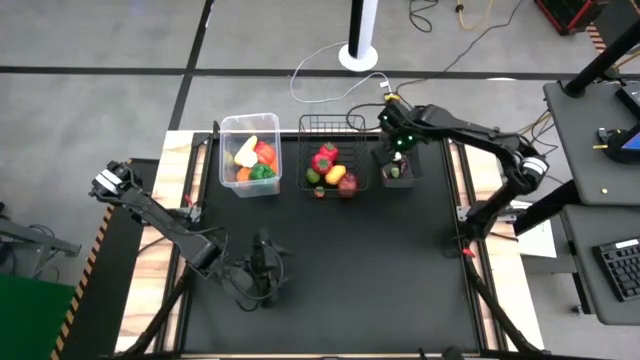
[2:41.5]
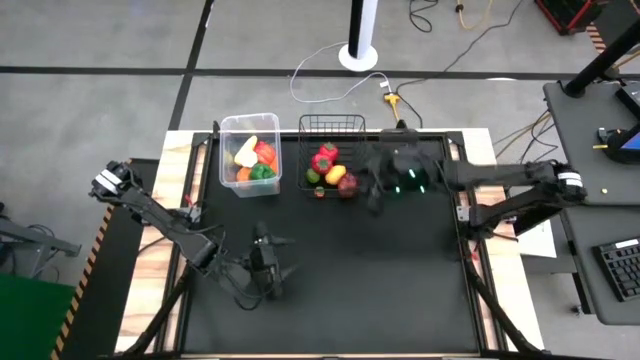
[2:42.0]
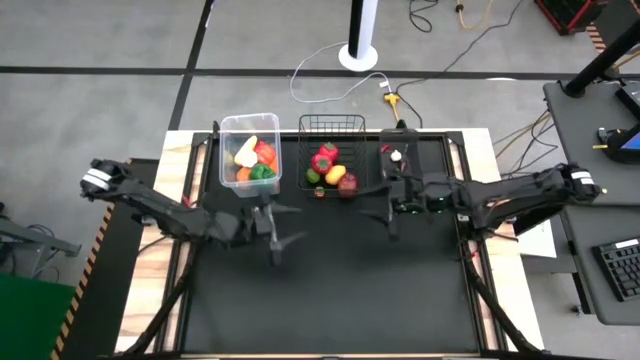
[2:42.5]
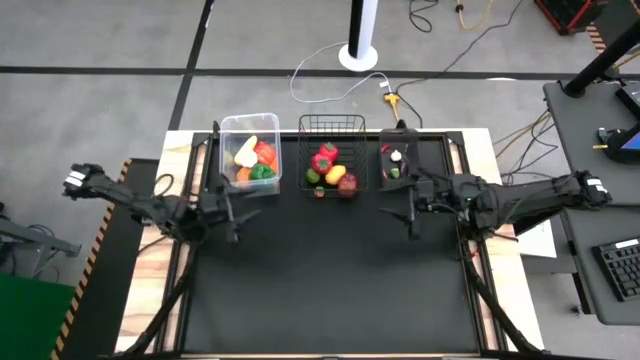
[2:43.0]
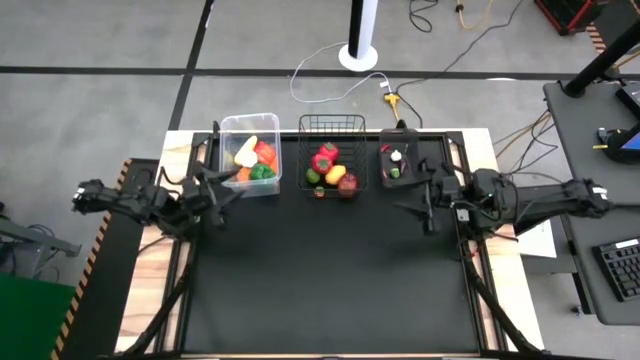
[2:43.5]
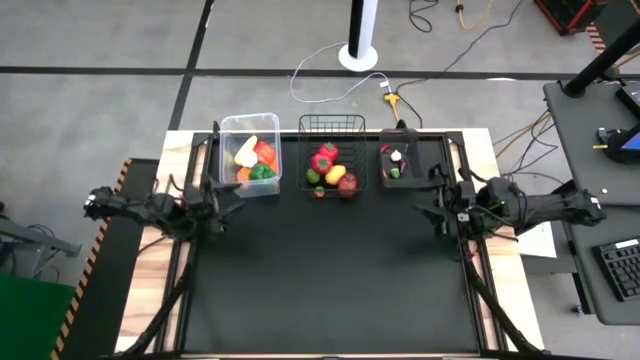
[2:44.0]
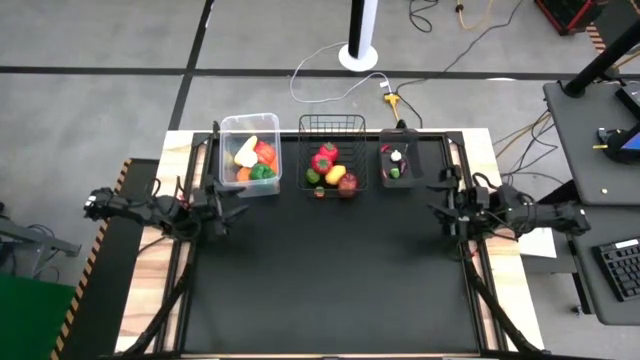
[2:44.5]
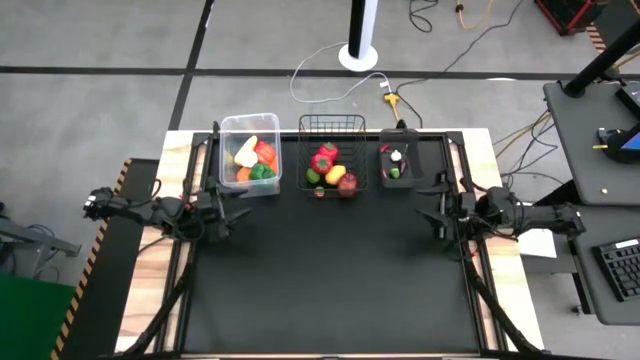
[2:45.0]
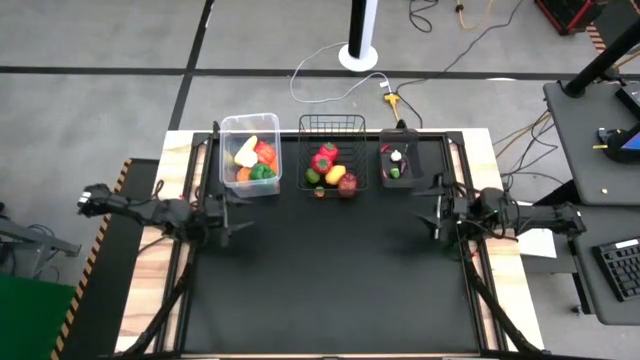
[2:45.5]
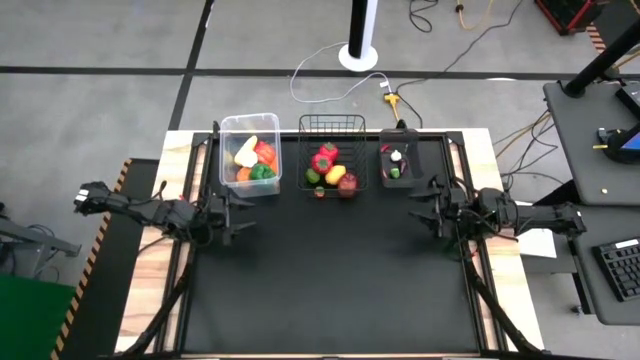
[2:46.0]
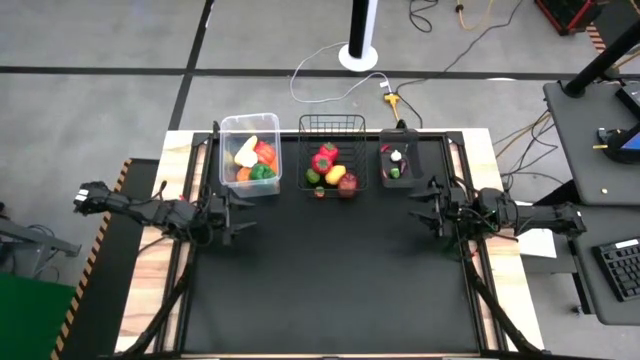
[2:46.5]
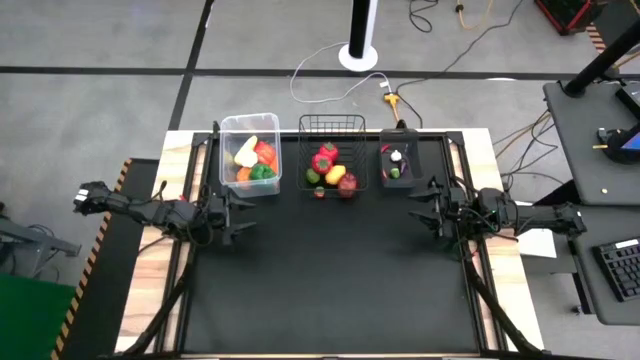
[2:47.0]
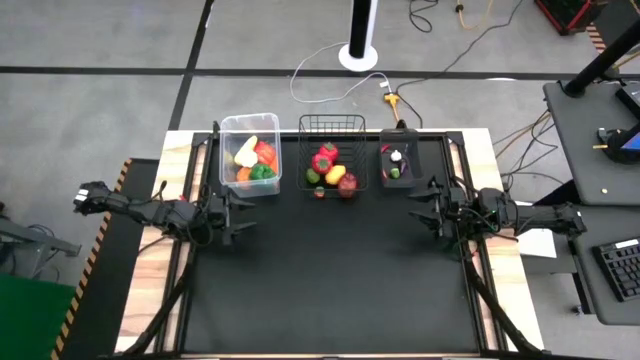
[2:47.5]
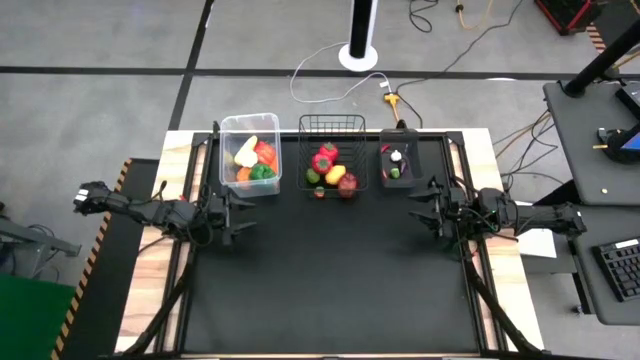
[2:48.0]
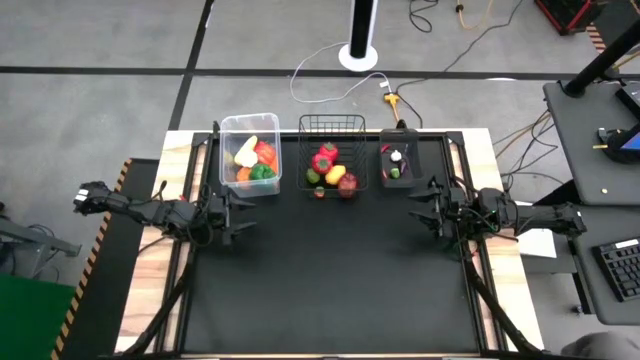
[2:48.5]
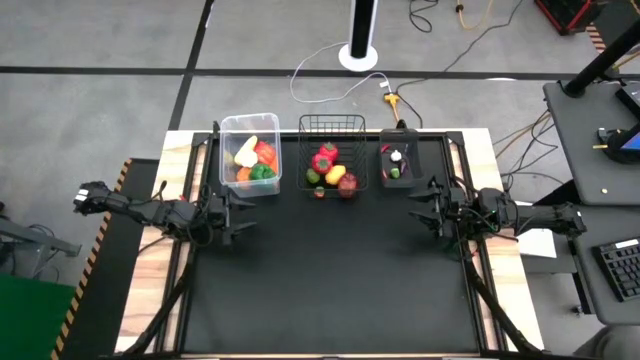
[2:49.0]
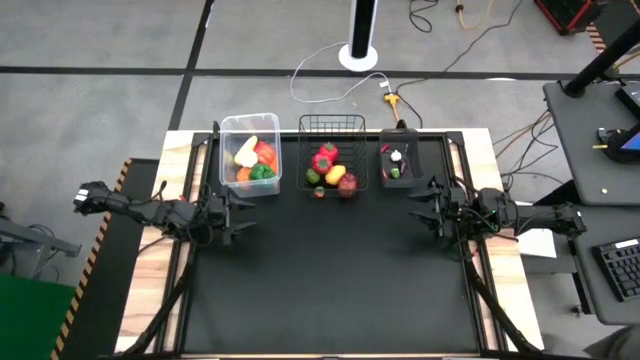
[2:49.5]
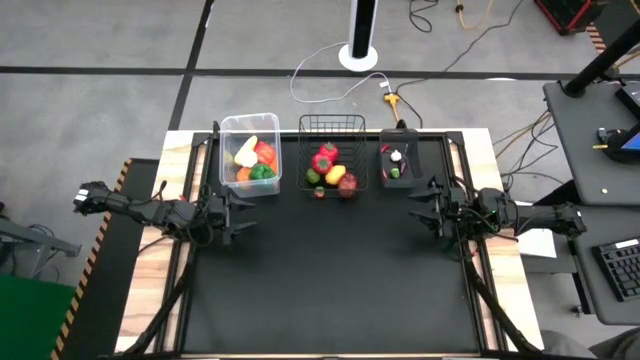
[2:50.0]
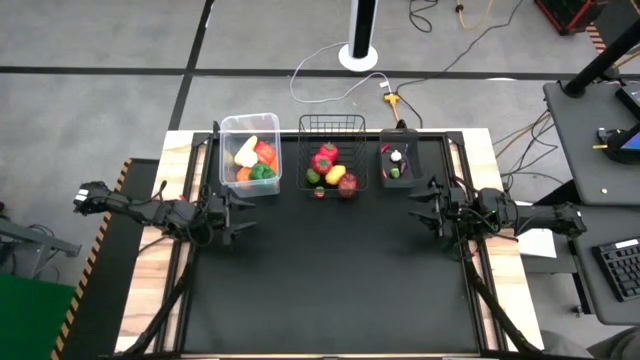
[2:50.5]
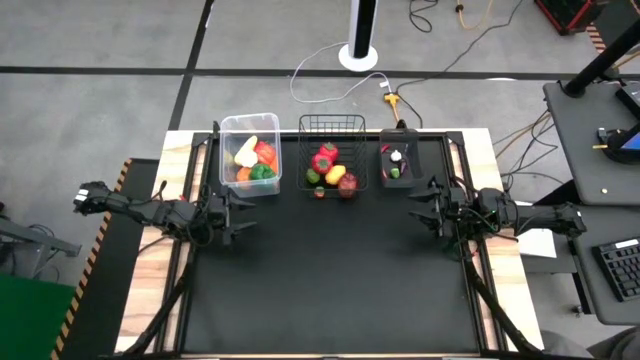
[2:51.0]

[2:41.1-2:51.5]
Task: Sort produce into baskets
Return to Home Position

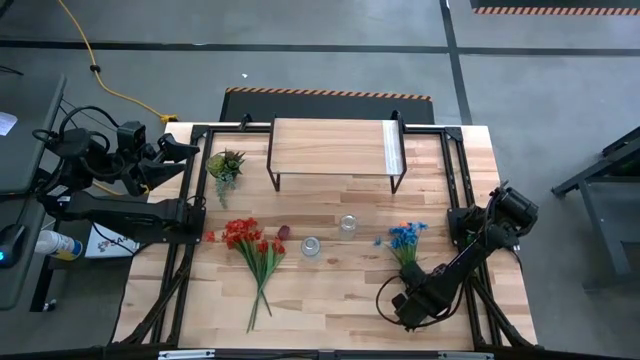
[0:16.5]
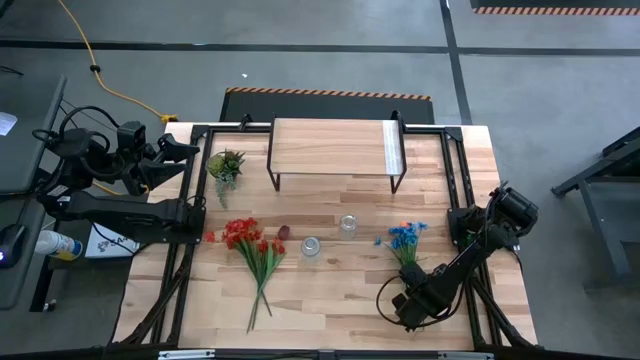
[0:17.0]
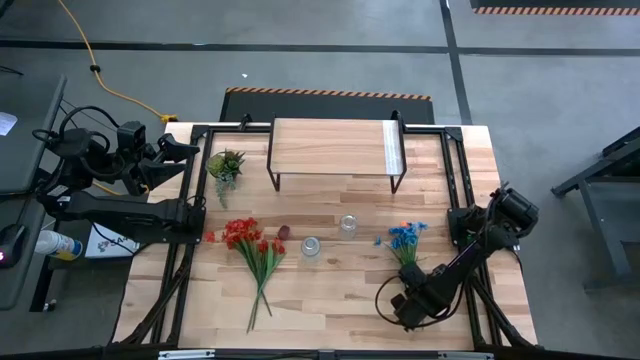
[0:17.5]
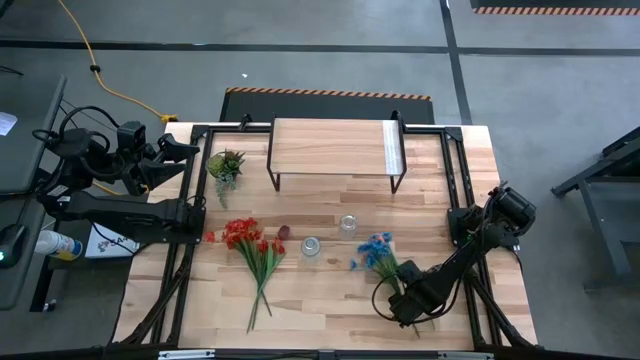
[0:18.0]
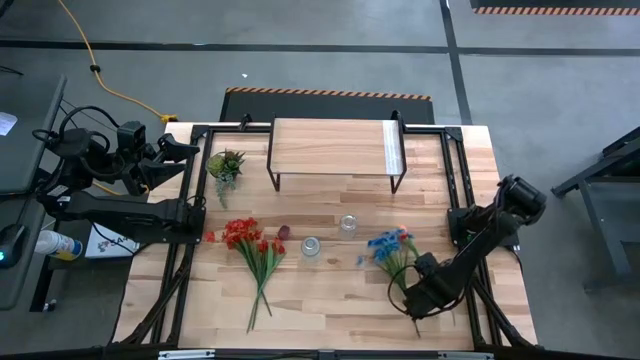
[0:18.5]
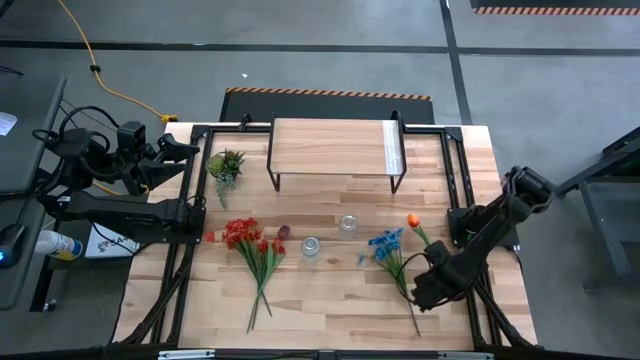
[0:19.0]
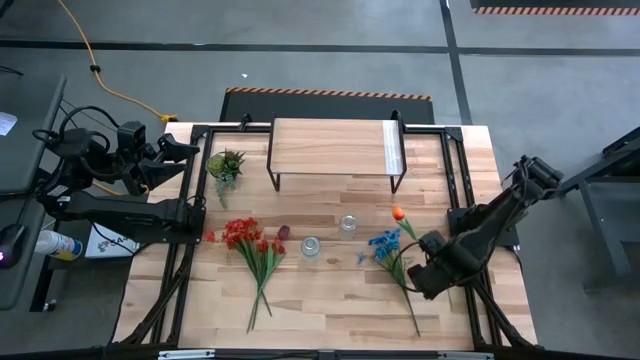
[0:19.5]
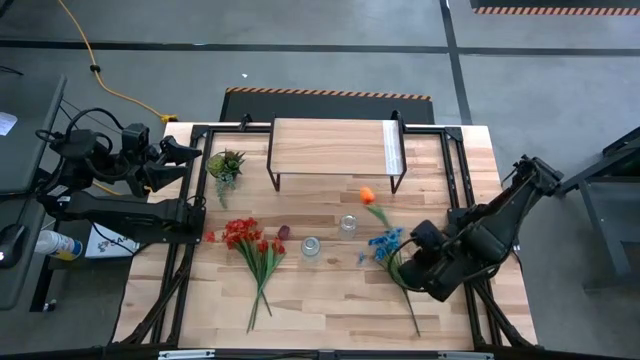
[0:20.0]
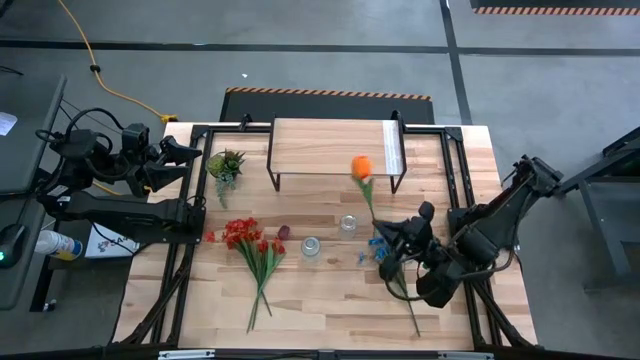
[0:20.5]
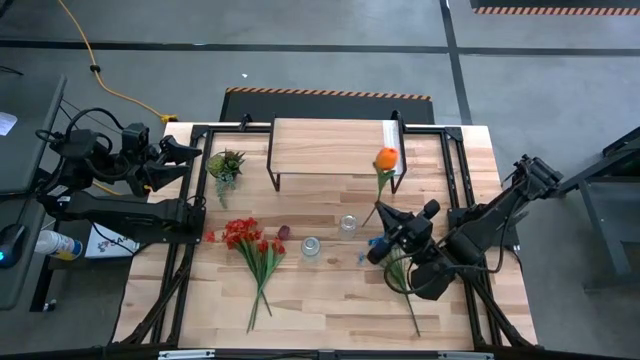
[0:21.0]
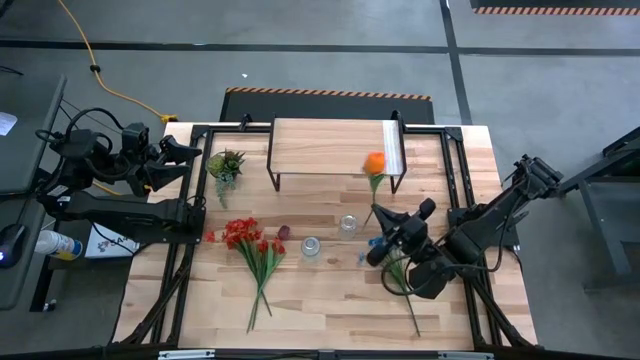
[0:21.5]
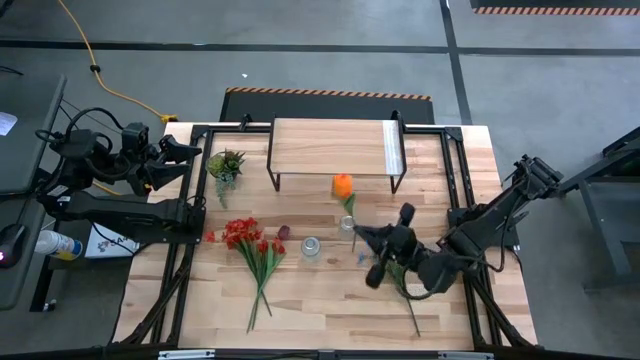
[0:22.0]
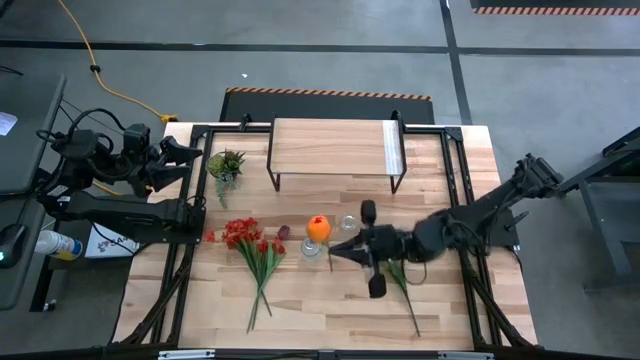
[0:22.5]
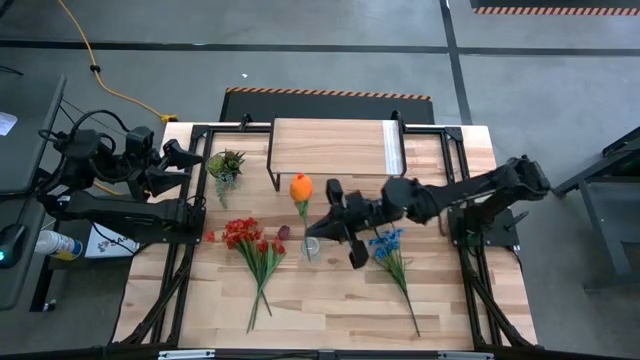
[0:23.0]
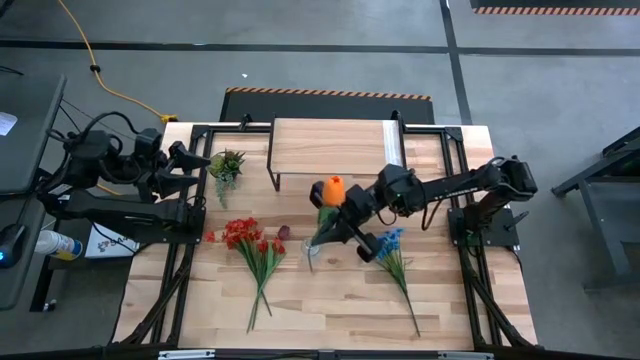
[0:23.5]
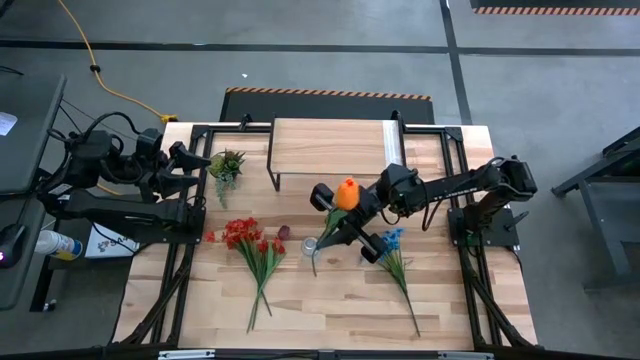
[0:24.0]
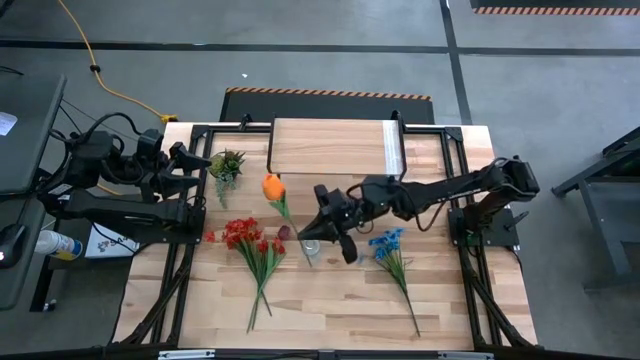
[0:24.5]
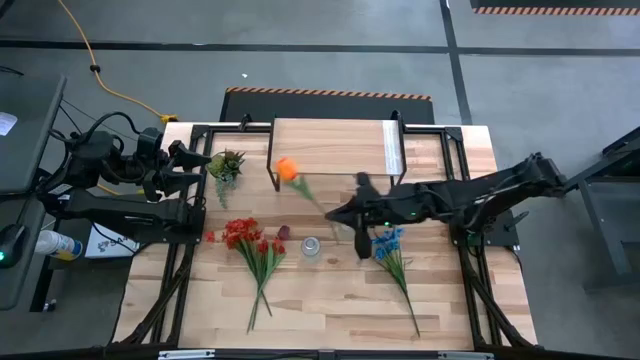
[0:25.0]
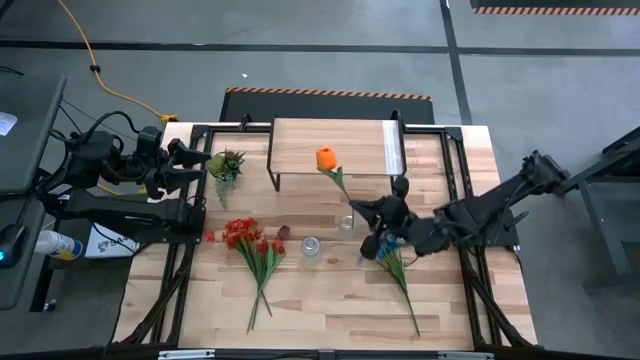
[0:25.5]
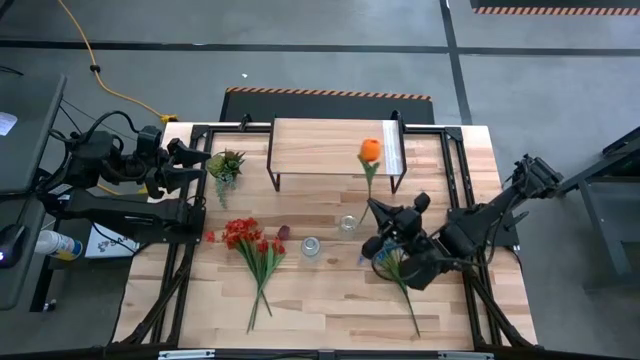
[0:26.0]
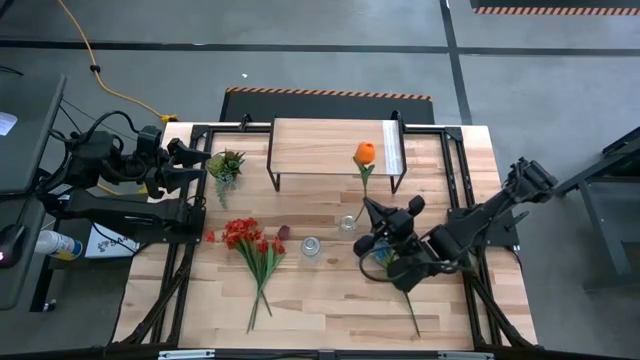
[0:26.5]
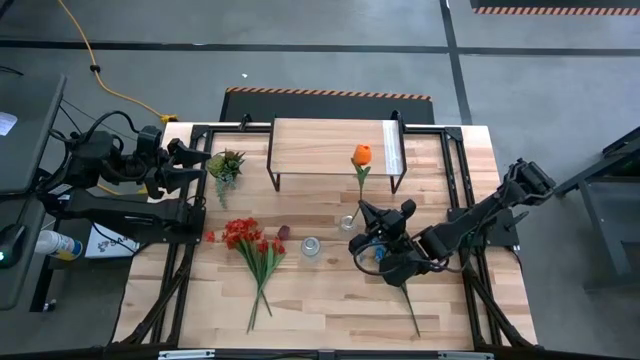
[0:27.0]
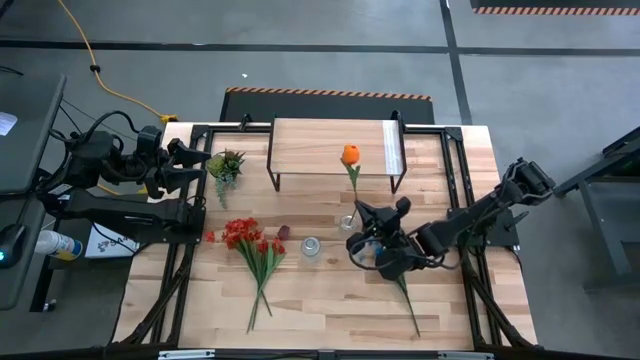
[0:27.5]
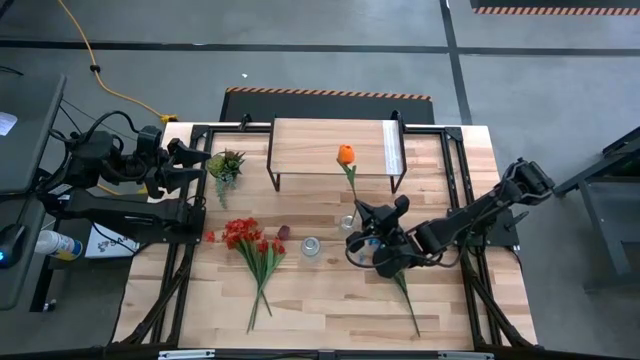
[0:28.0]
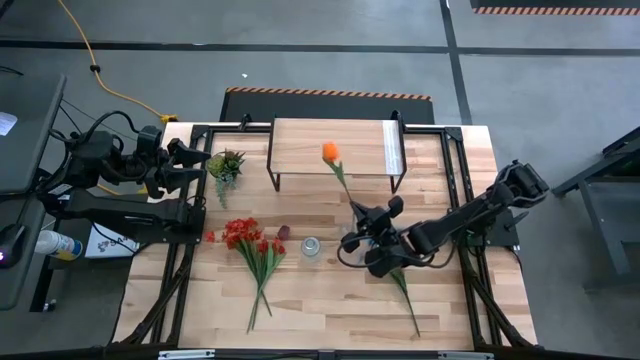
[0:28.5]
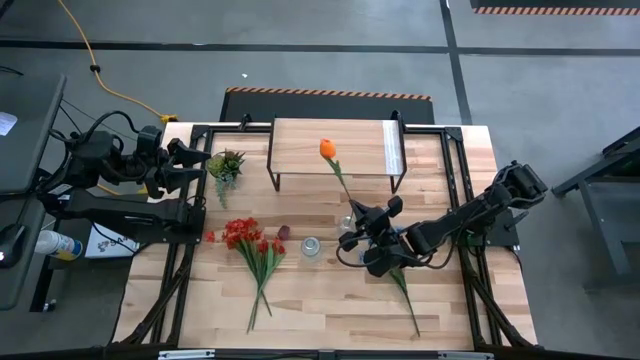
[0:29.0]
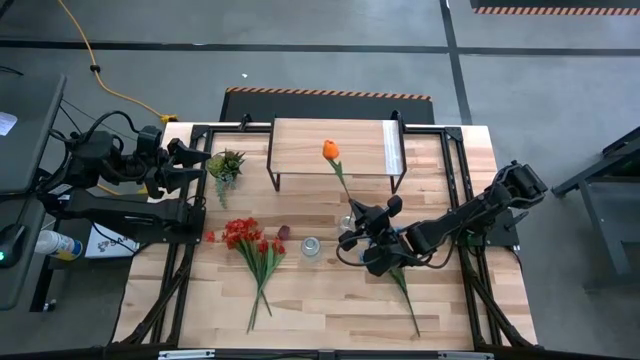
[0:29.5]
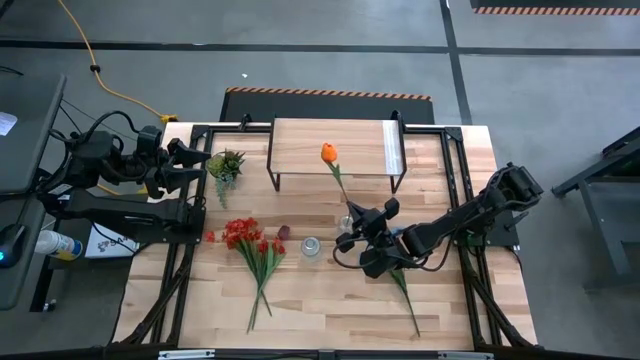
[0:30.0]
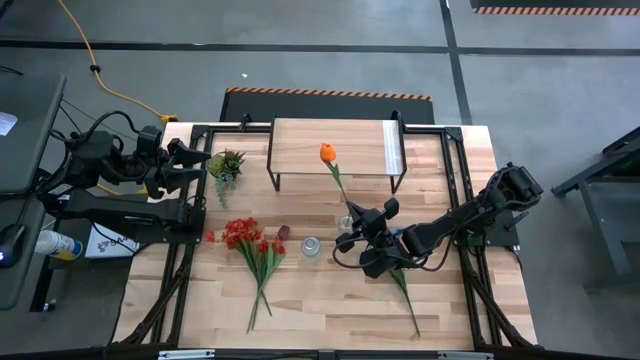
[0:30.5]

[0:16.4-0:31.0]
Task: Pick and place flowers into a vace then onto a shelf
Put the orange flower into the top transparent vase
